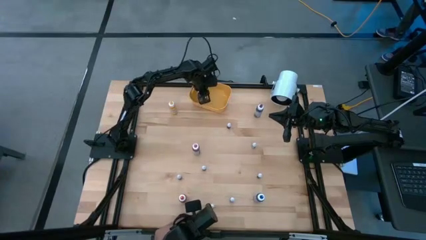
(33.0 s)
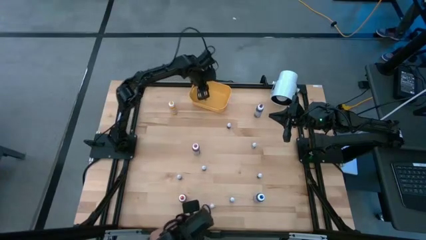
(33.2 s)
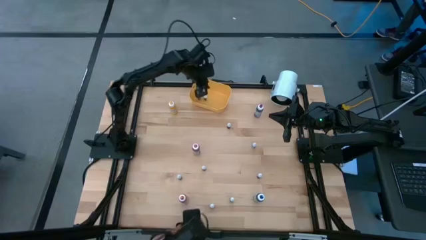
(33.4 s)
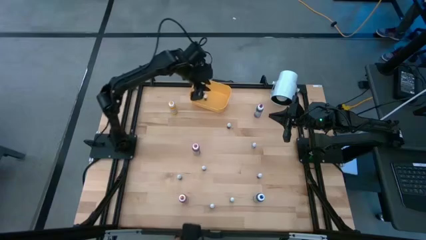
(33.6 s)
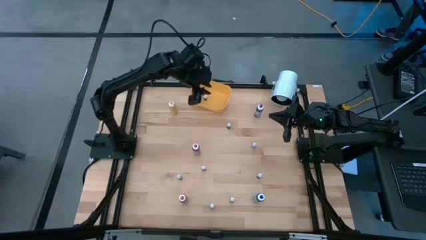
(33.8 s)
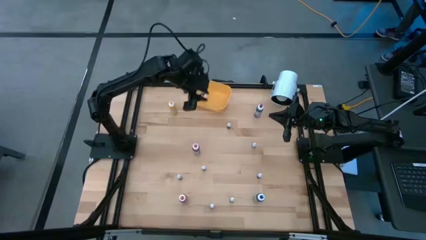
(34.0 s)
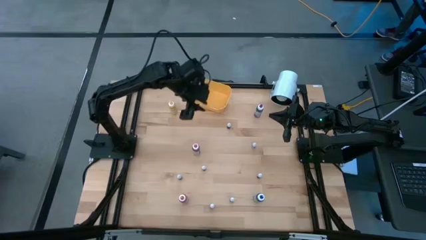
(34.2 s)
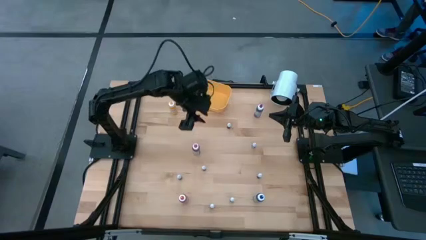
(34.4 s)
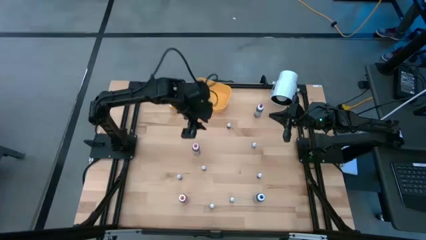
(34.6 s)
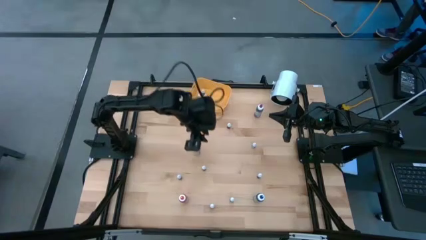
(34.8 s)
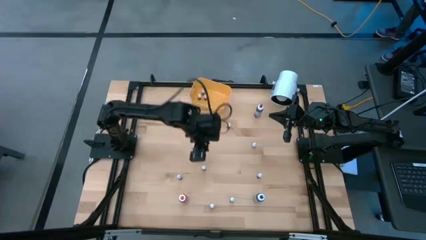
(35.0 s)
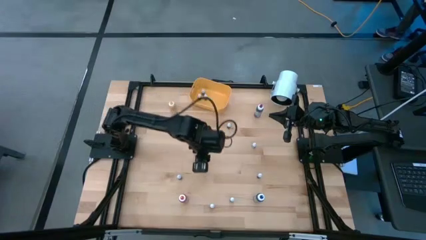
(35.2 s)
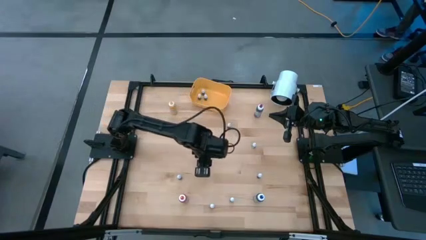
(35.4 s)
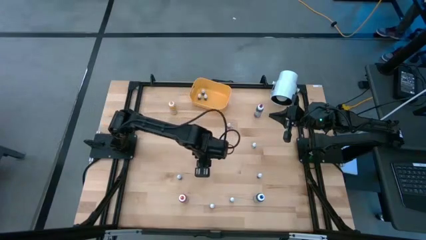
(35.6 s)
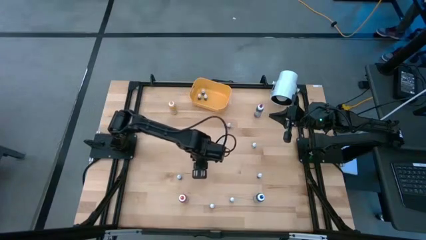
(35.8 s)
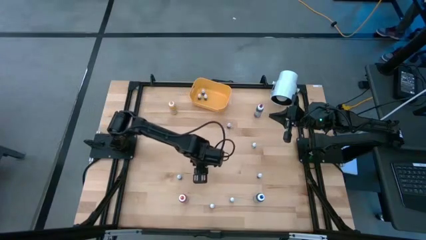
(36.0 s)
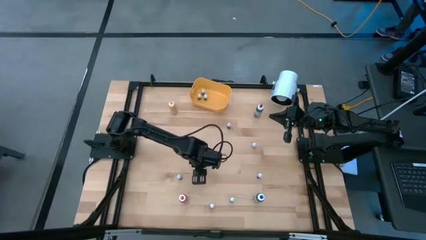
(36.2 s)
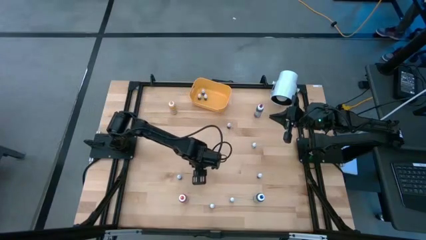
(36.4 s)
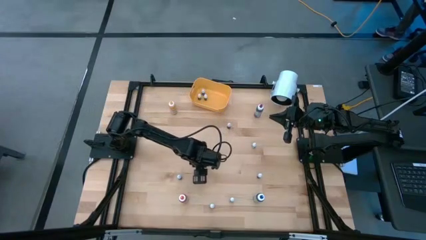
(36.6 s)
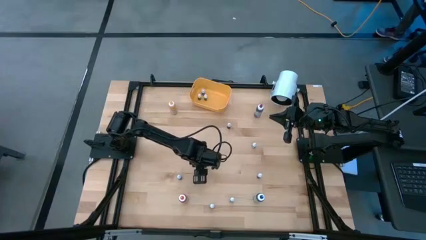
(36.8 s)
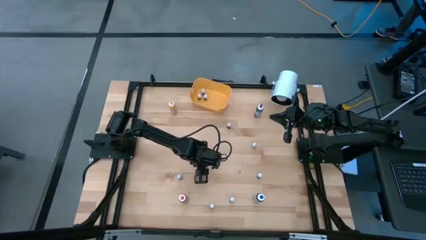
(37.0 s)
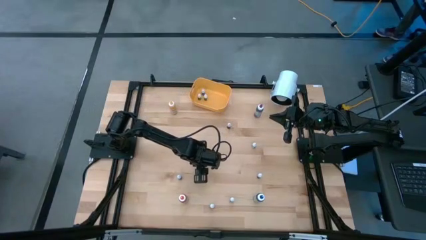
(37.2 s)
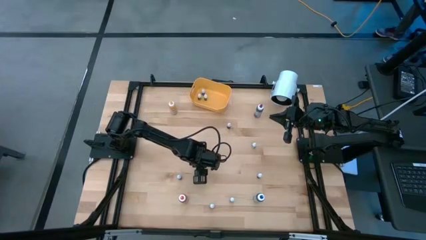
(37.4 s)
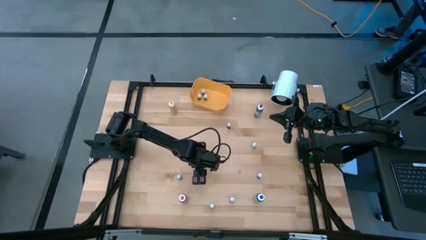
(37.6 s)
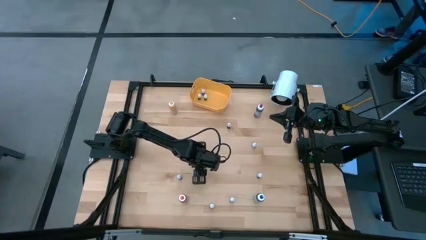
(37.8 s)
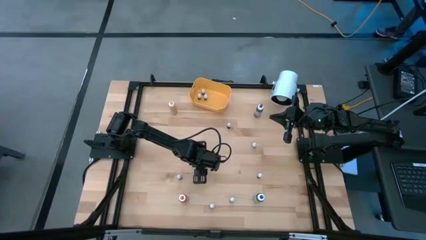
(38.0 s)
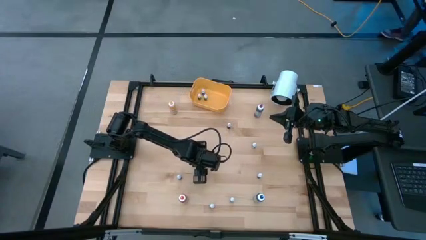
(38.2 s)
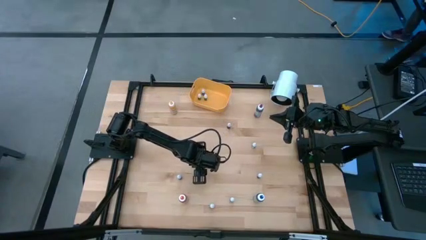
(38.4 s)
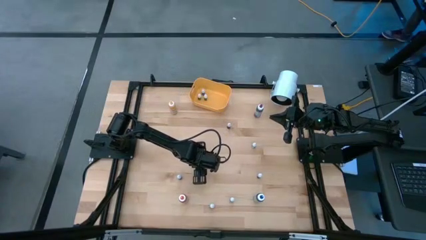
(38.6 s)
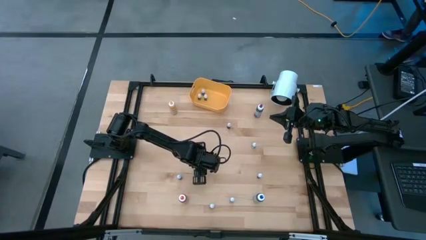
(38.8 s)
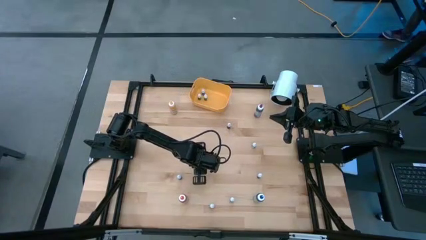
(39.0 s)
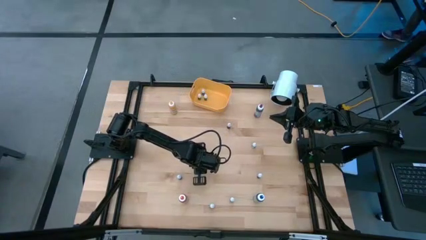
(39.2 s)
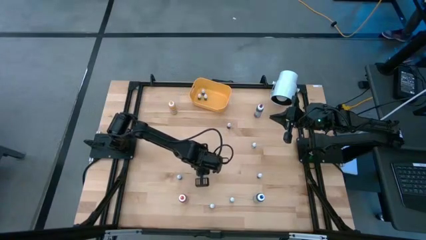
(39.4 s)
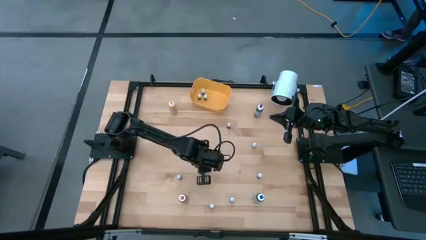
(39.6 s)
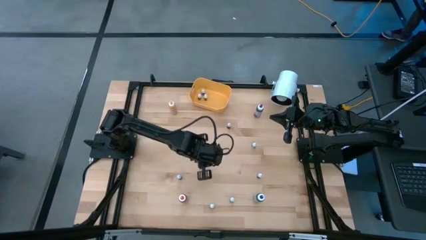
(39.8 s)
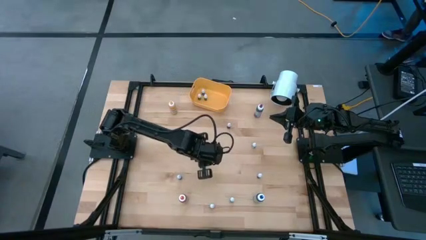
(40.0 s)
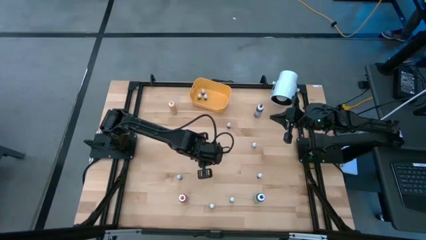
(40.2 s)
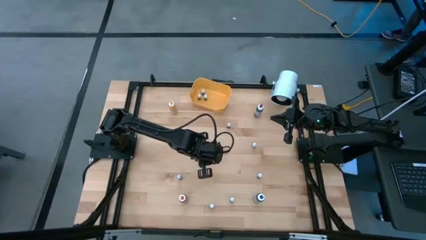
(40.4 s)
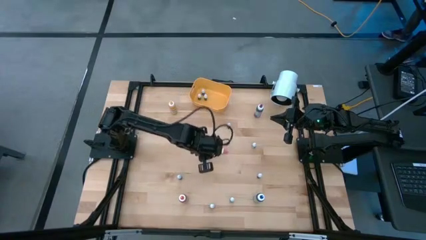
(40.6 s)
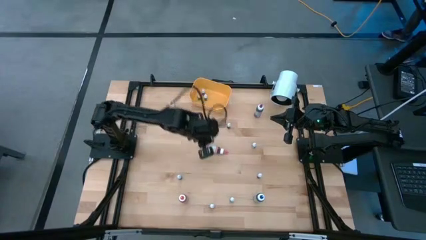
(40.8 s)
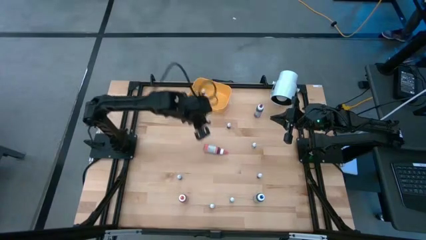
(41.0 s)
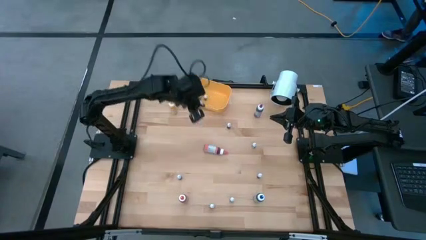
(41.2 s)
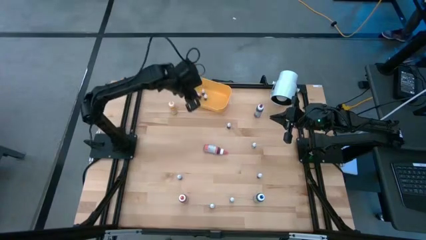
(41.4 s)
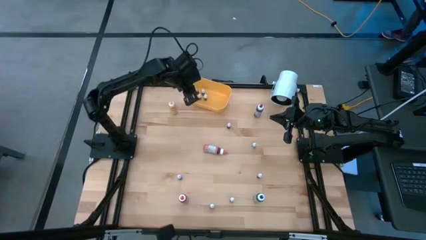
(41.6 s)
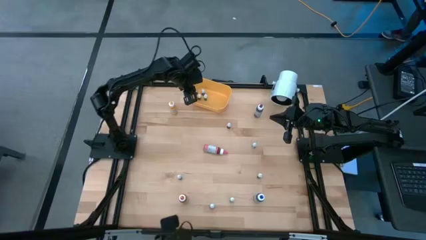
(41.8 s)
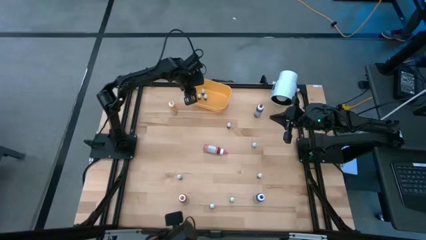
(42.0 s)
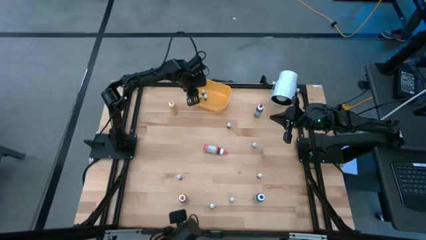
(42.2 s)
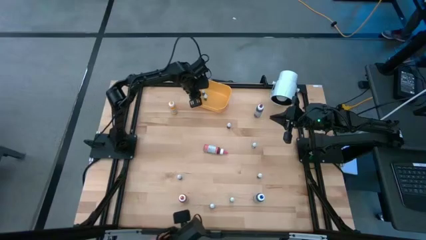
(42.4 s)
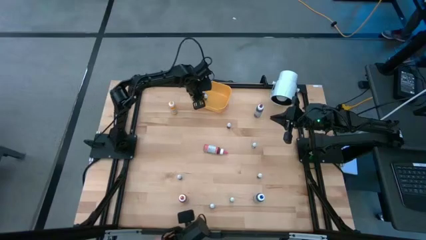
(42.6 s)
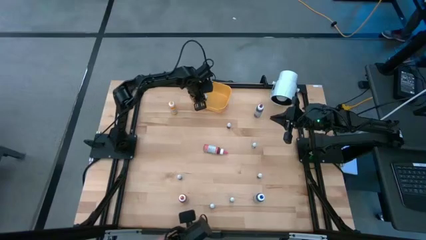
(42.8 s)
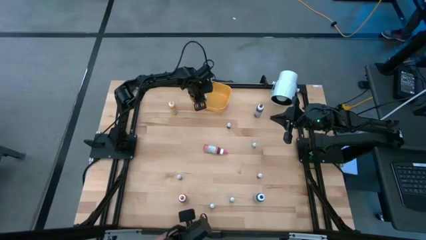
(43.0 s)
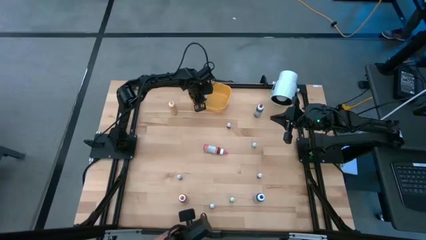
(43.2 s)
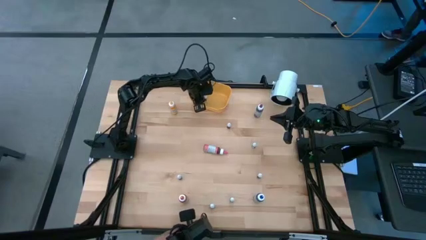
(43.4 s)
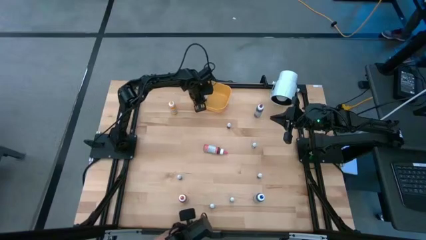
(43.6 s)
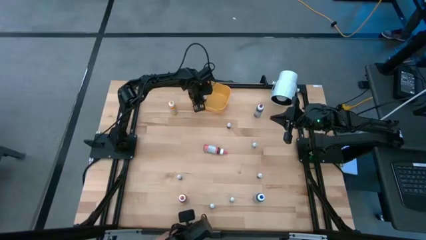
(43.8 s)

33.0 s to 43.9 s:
Task: Pick & Place food coloring
Put the top small pink food coloring bottle into the bin

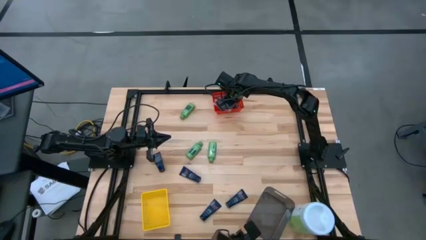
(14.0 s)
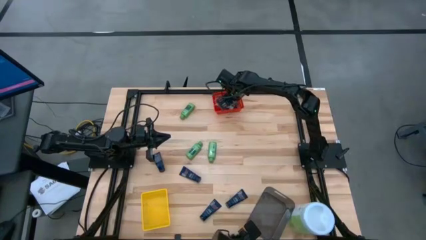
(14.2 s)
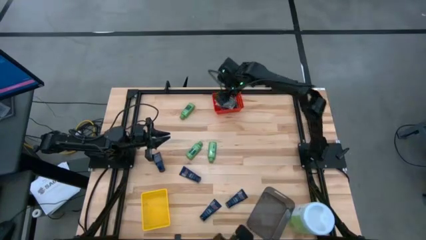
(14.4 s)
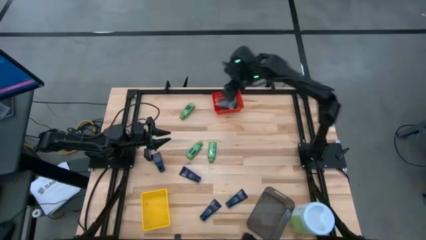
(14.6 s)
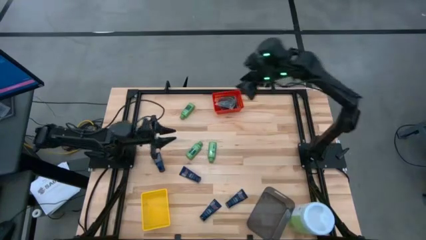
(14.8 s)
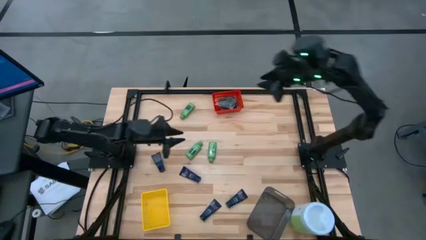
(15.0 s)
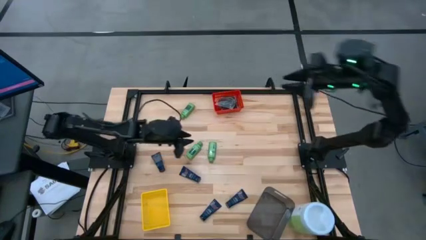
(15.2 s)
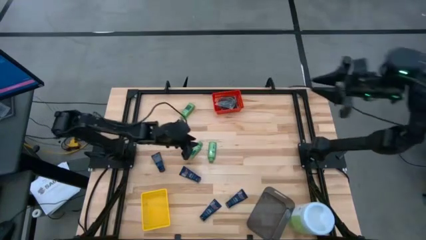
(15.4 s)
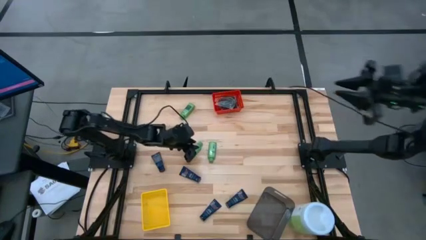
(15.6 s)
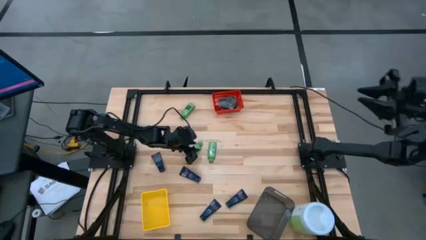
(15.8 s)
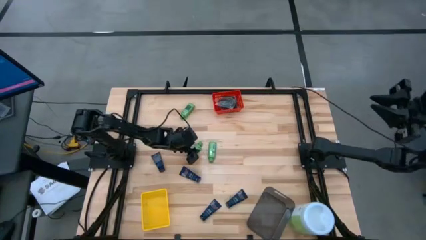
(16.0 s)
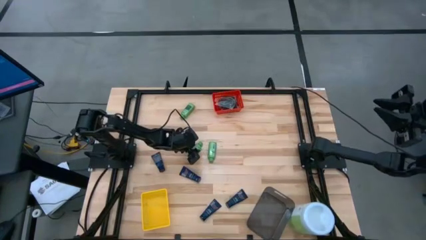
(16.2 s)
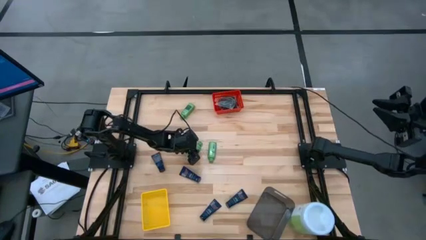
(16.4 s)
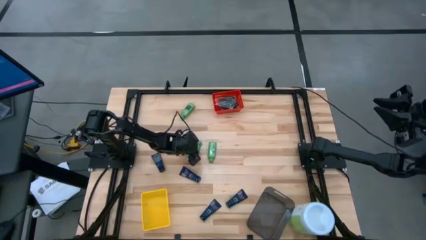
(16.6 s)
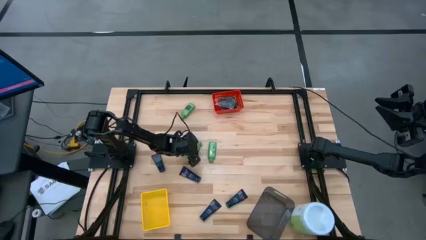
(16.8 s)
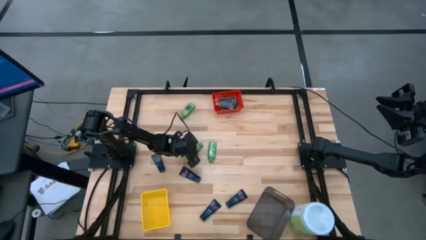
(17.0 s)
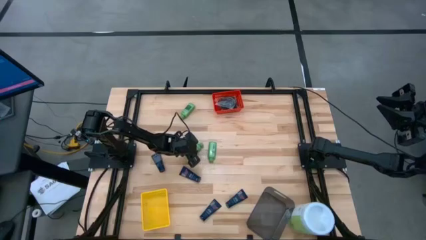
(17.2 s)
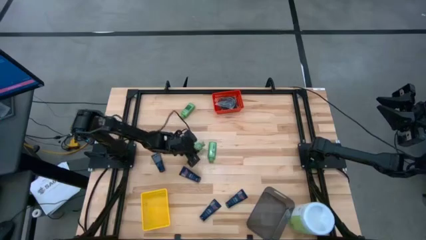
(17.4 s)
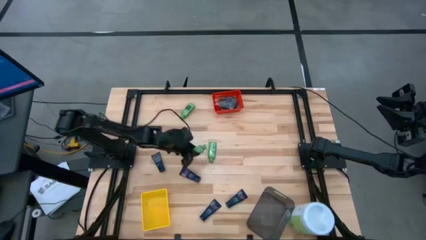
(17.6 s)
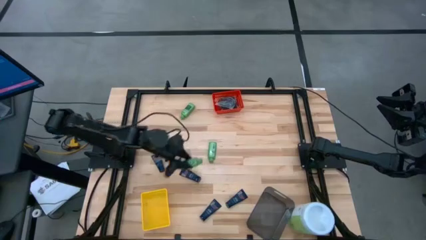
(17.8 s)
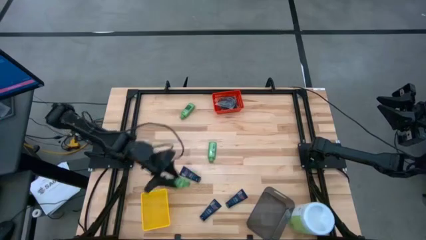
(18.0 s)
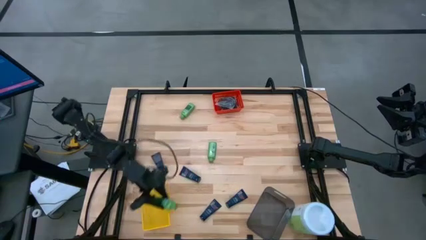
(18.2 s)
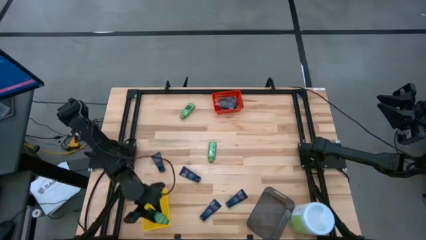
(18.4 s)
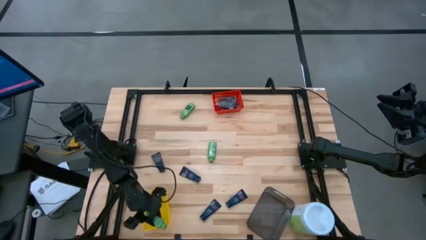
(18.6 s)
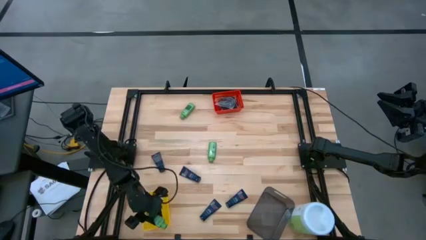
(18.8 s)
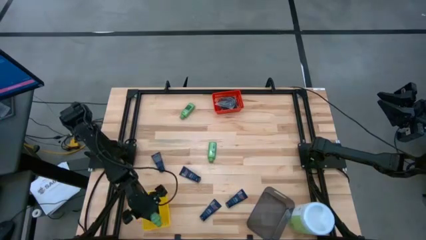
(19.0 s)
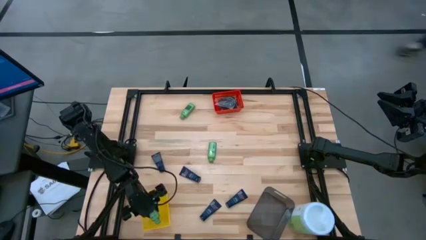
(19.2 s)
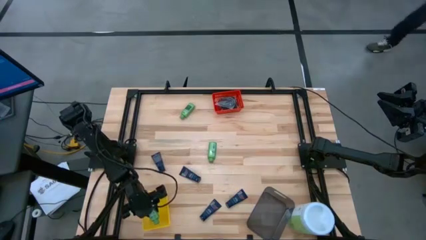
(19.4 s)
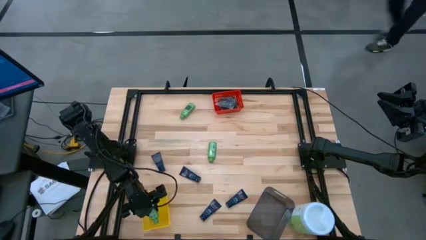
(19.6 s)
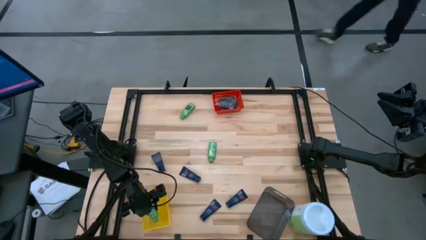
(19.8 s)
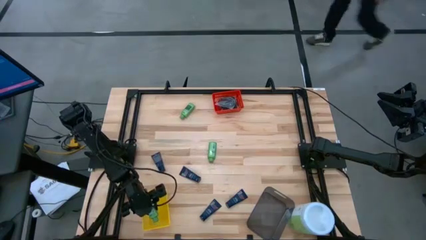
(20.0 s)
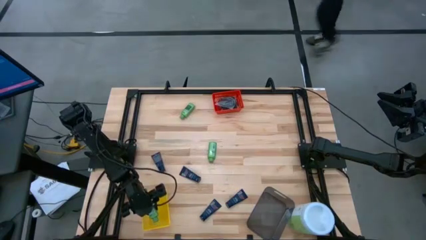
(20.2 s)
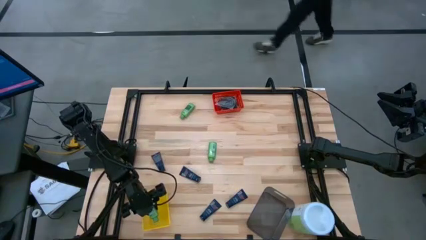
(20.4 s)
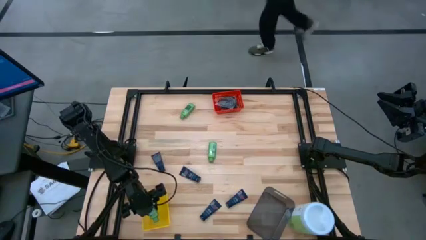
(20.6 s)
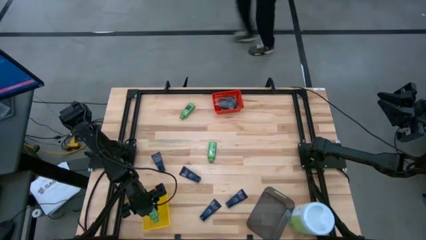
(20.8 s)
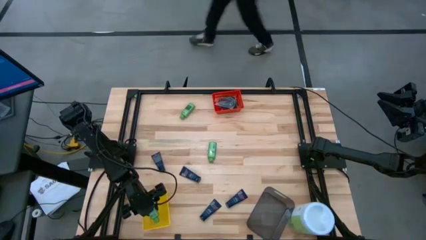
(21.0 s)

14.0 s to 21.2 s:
Task: Pick & Place Travel size toiletries
Put the green shampoo into the yellow bin
